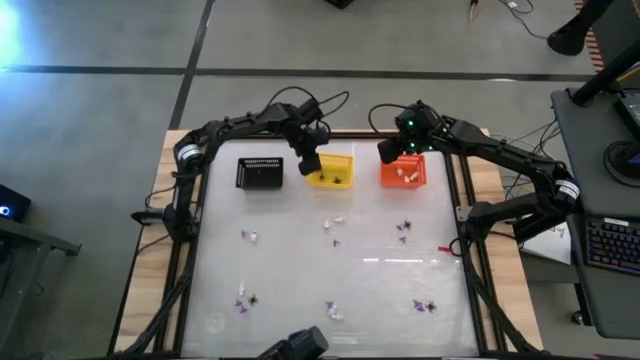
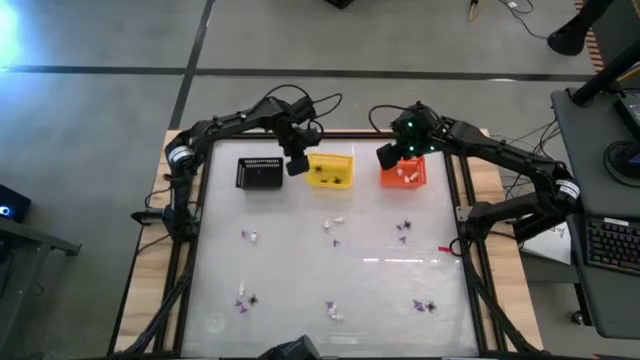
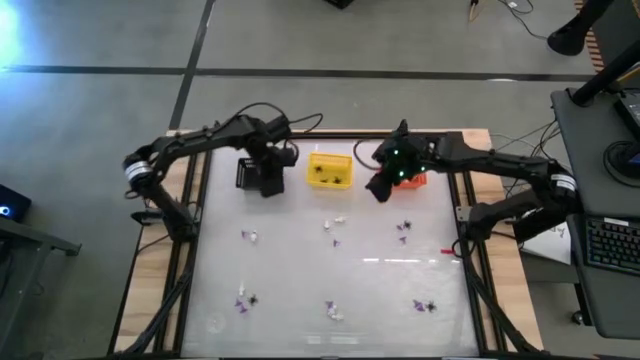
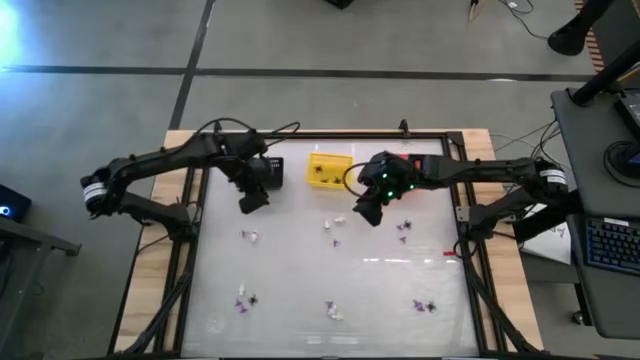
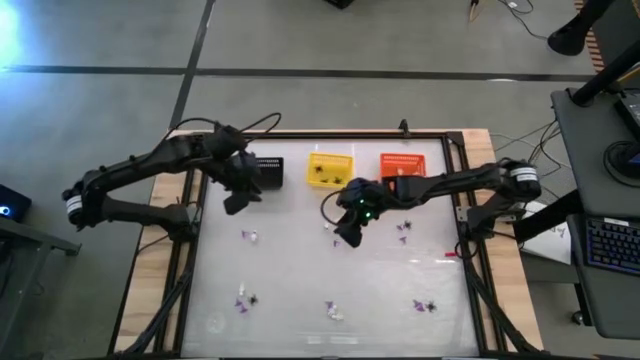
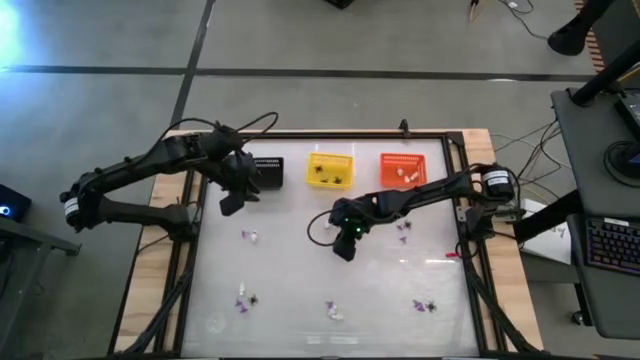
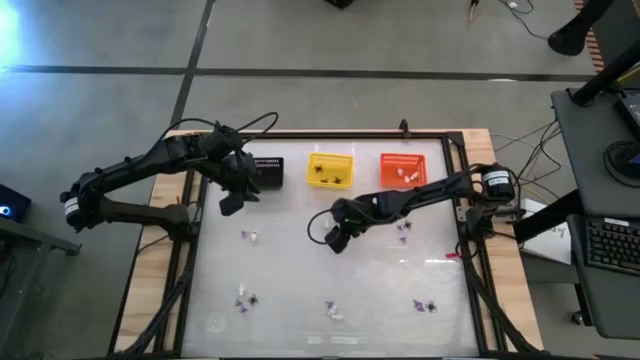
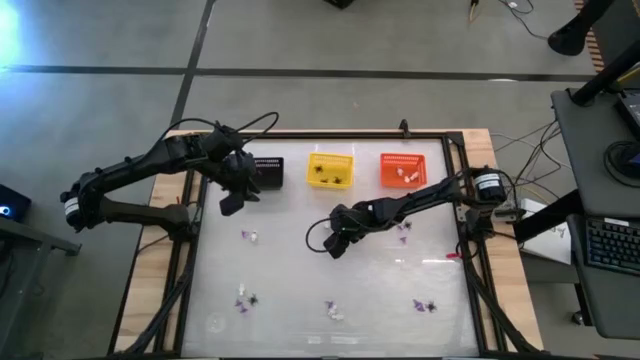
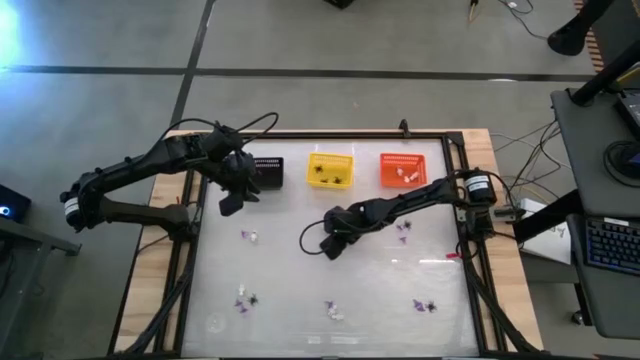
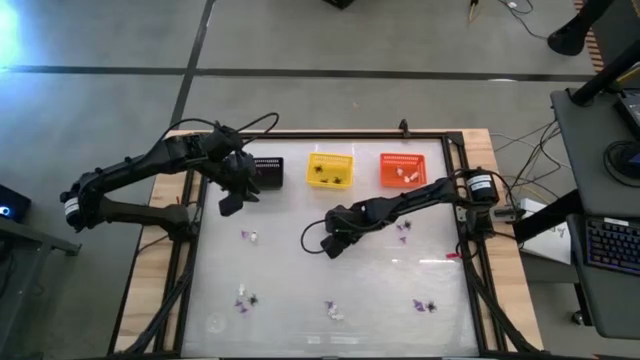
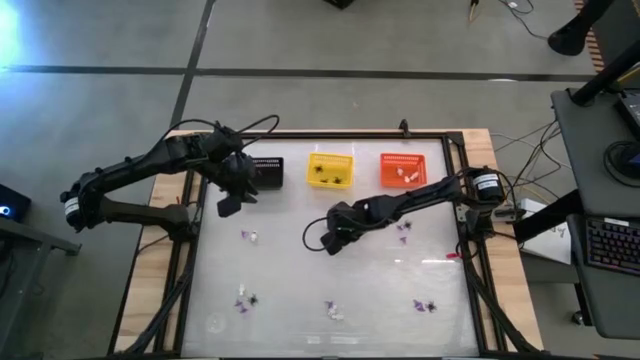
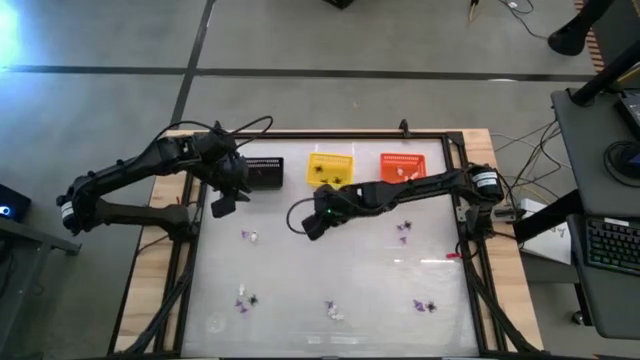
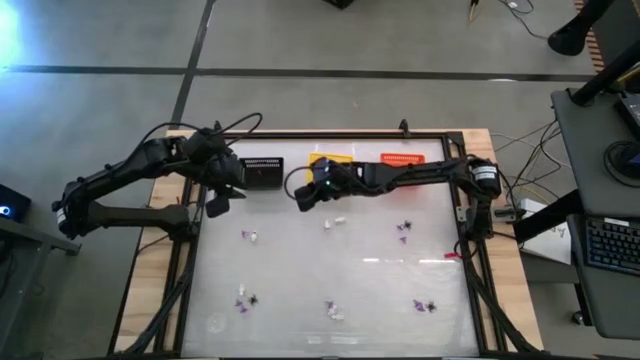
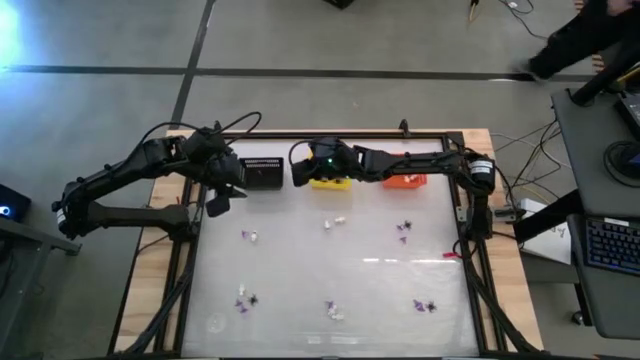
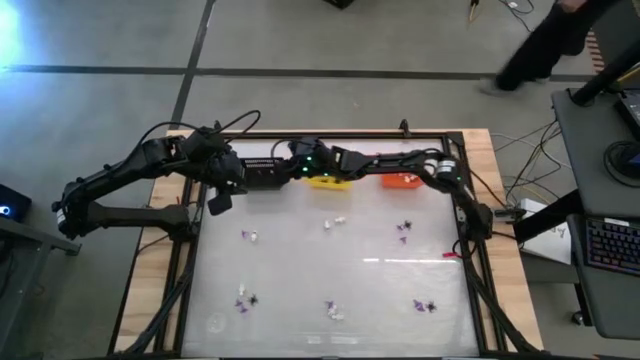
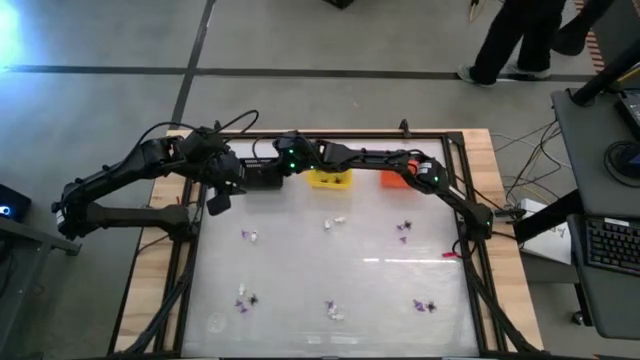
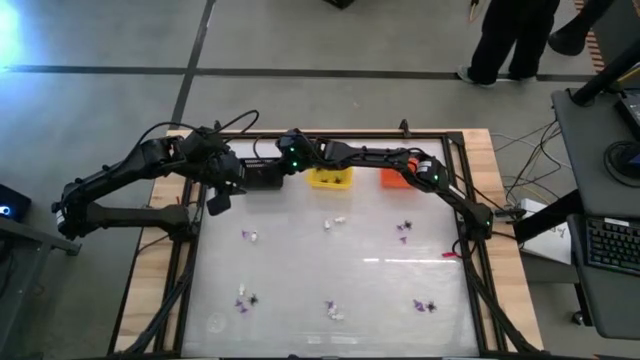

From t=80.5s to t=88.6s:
Task: Sort Halloween decoration
Put the violet hat toy into the black bin

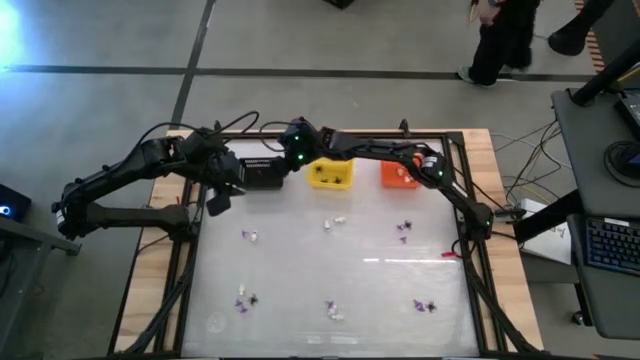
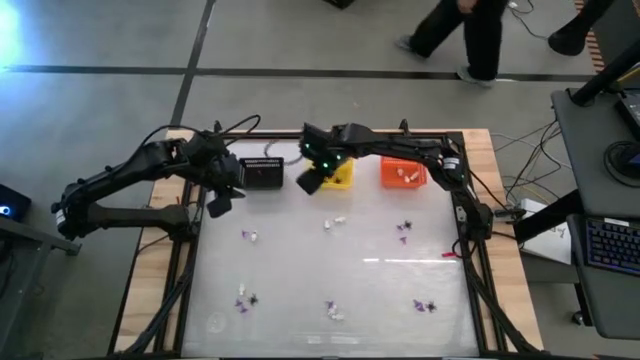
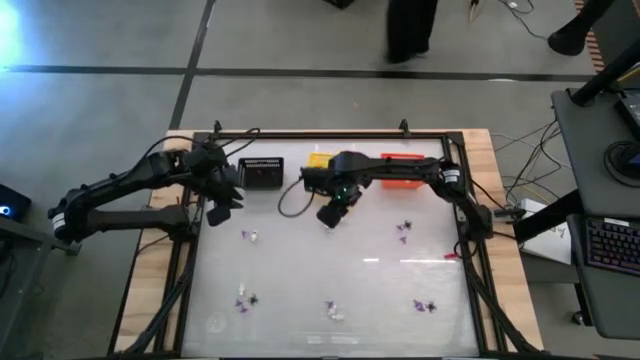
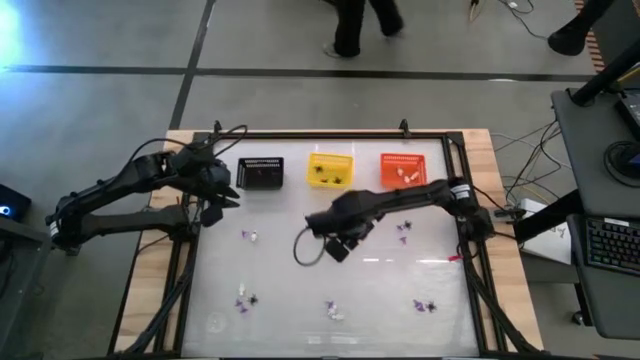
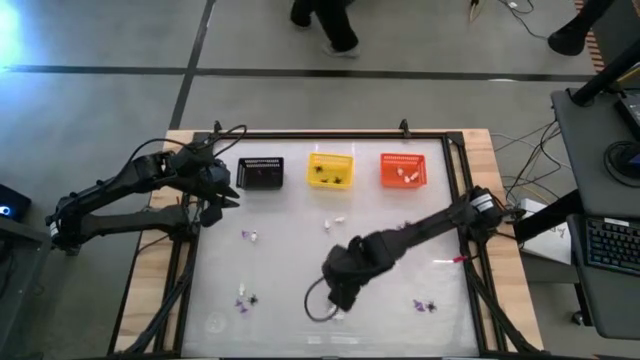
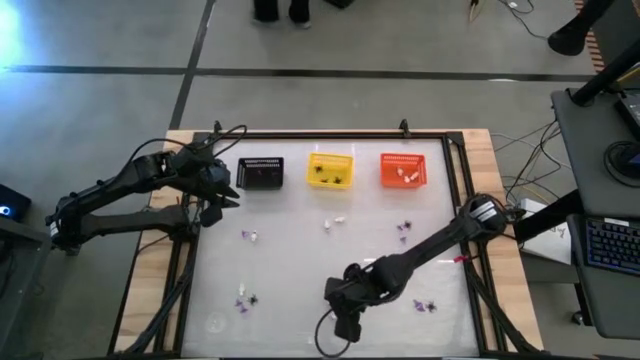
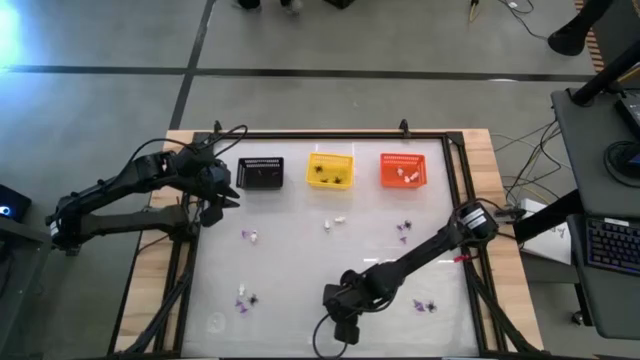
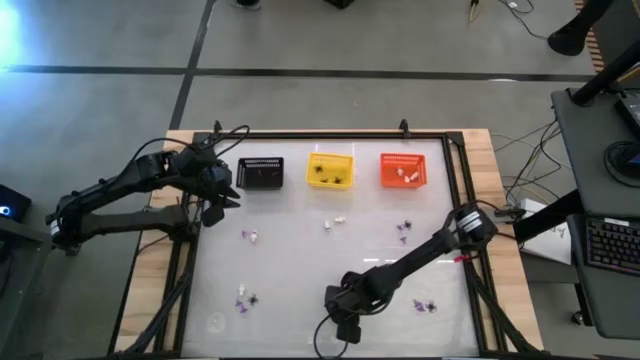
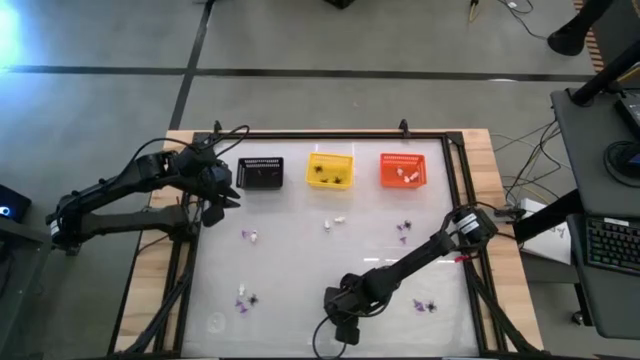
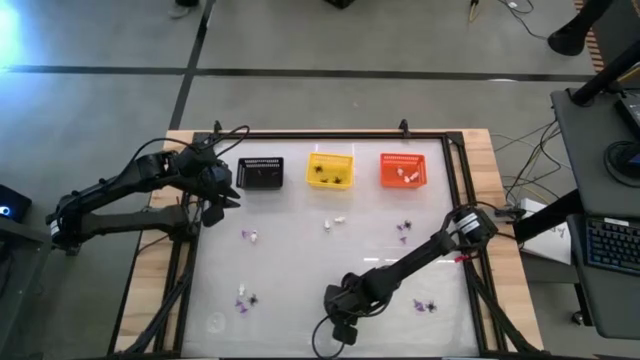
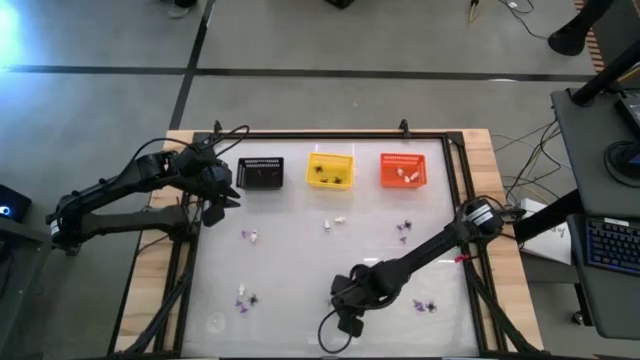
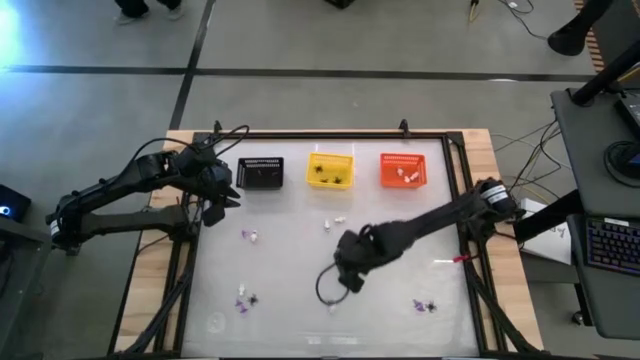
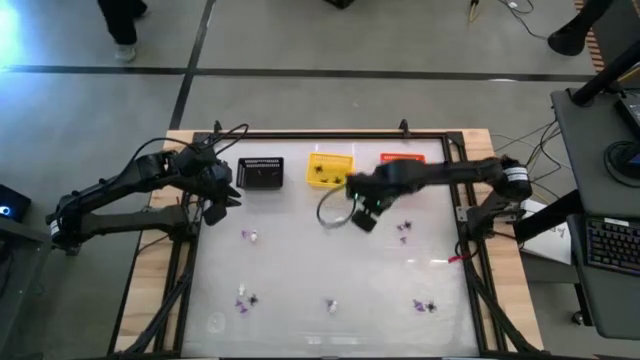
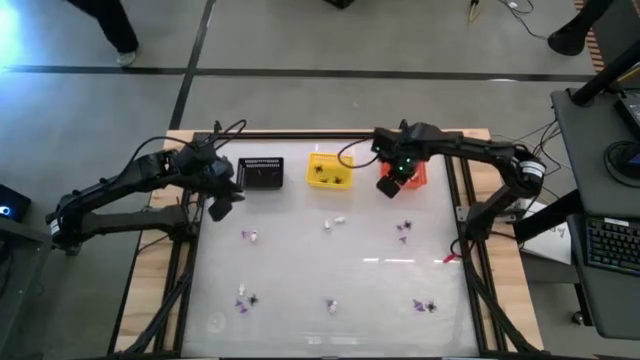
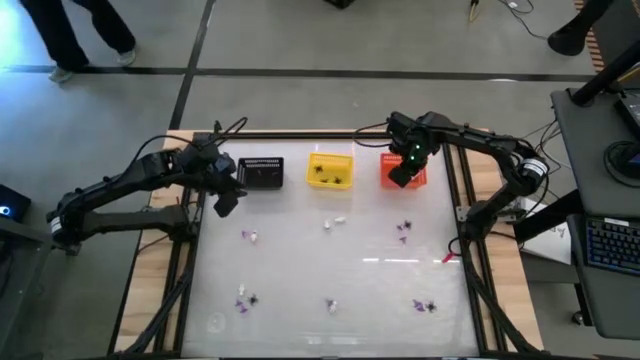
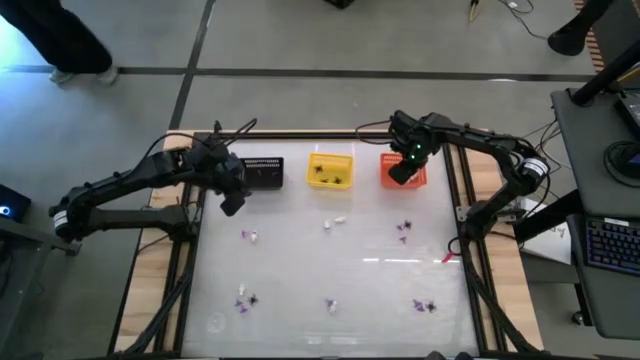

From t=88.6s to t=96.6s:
Put the white skeleton toy into the orange bin

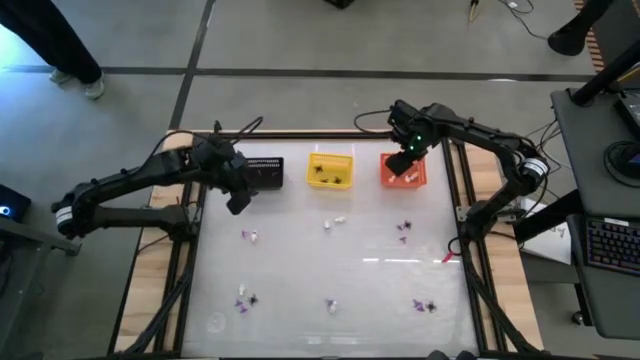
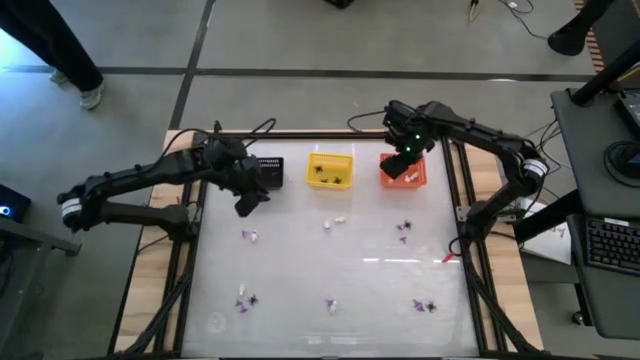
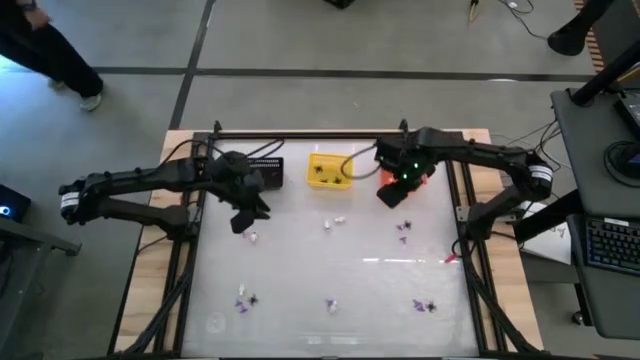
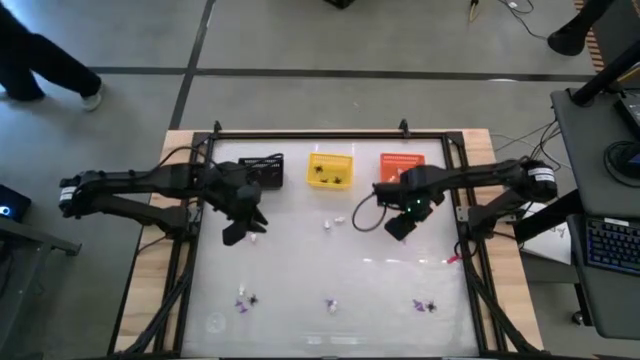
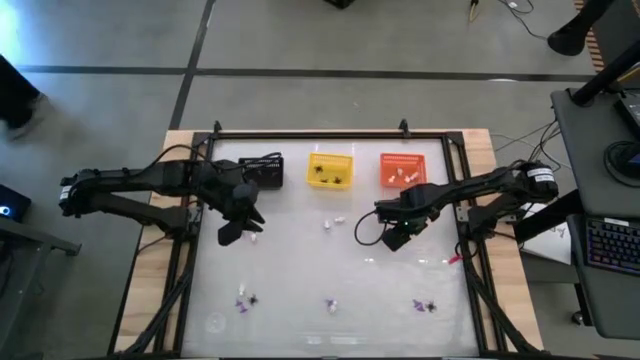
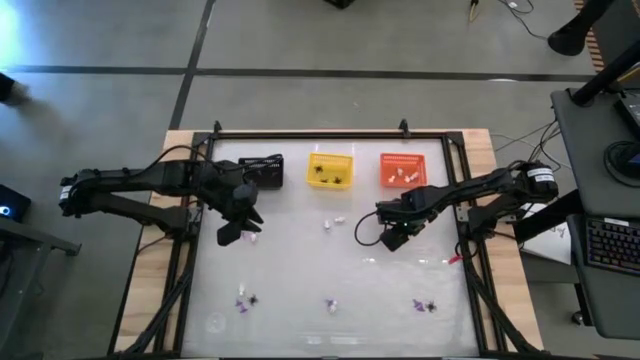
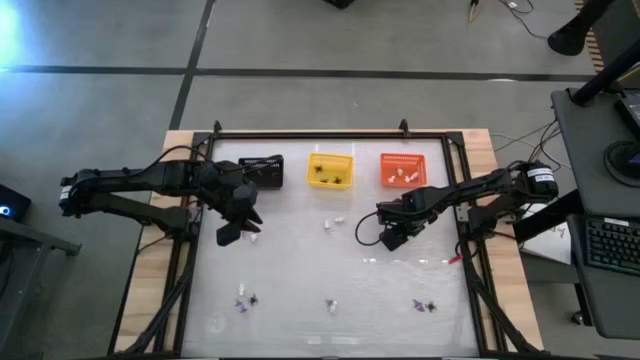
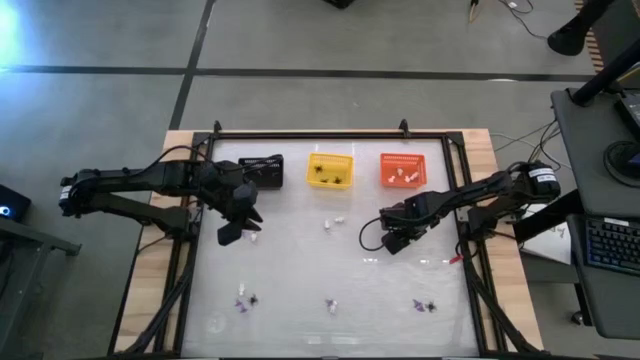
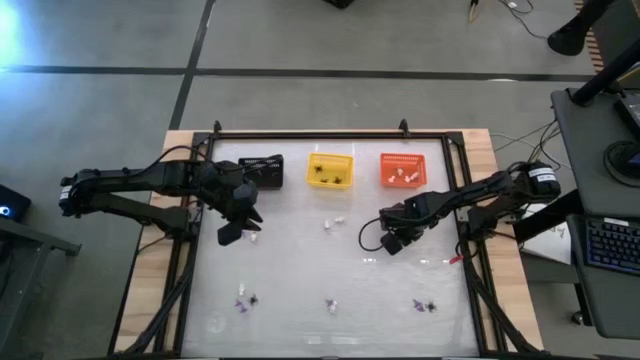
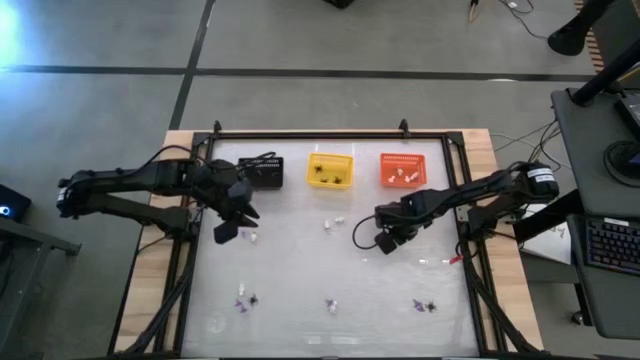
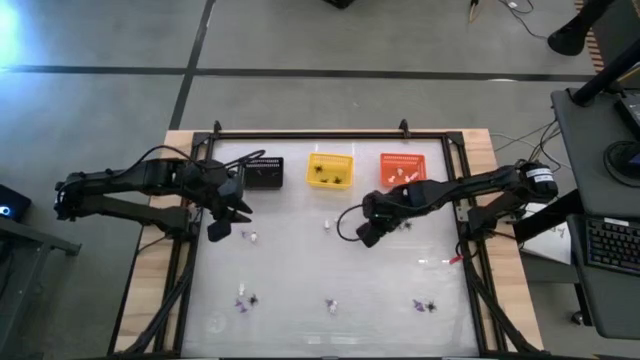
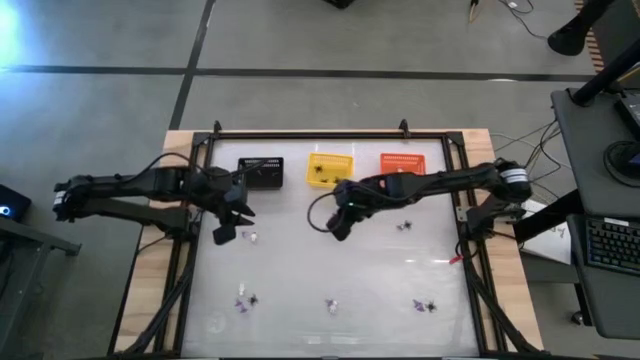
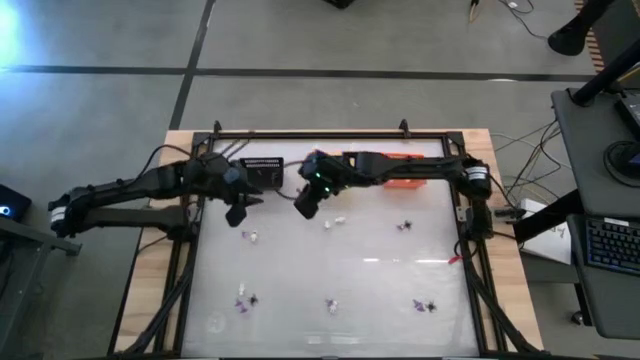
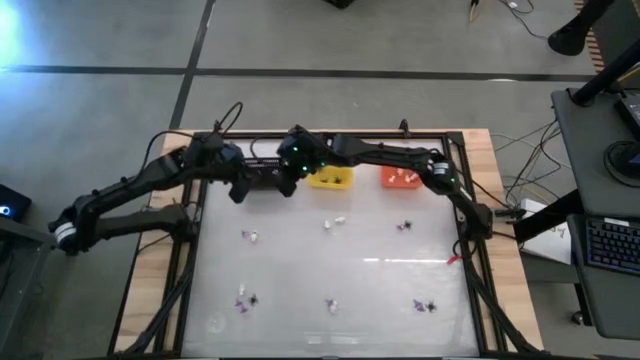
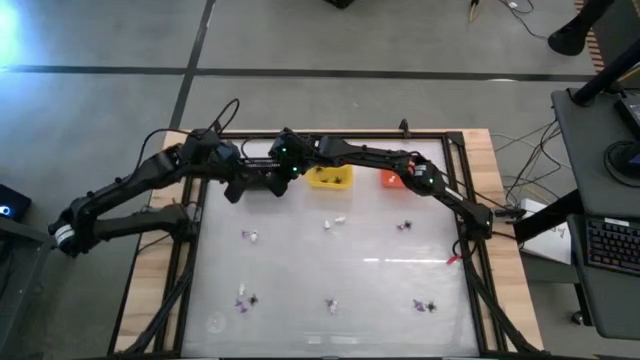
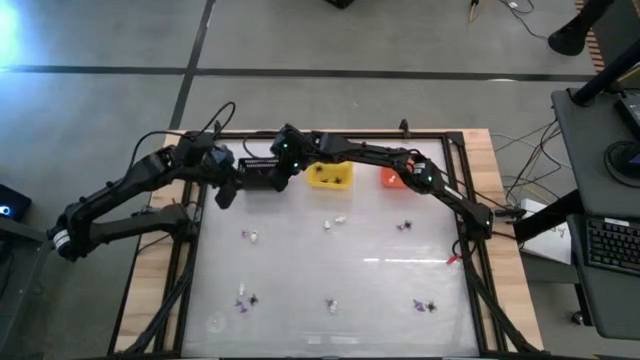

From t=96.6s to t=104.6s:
Put the violet hat toy into the black bin
